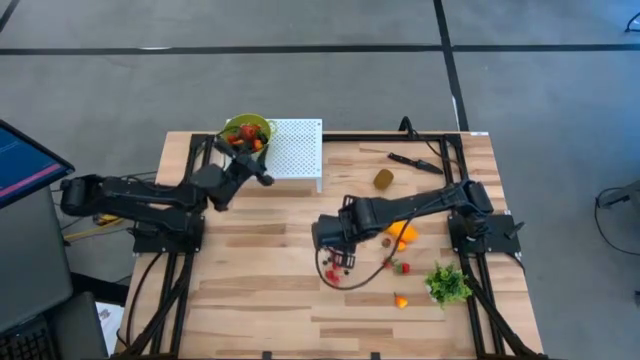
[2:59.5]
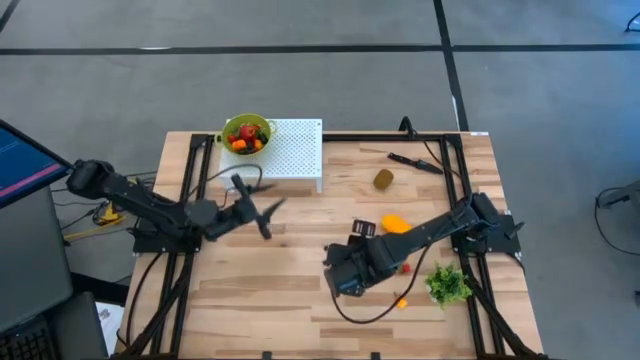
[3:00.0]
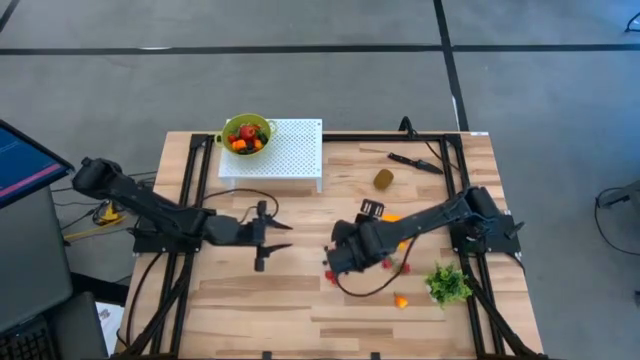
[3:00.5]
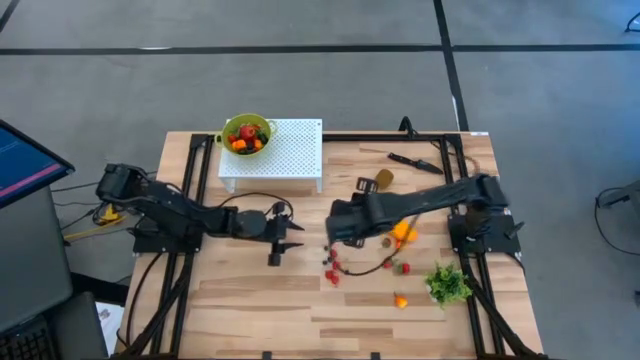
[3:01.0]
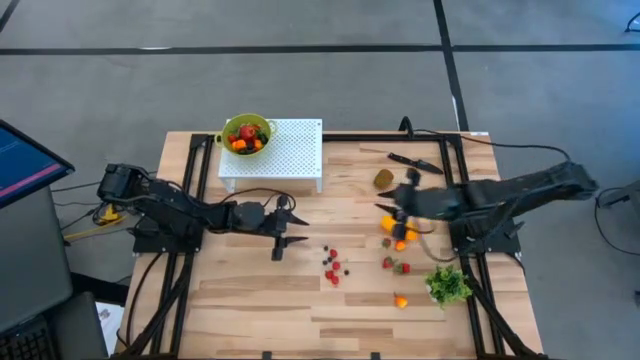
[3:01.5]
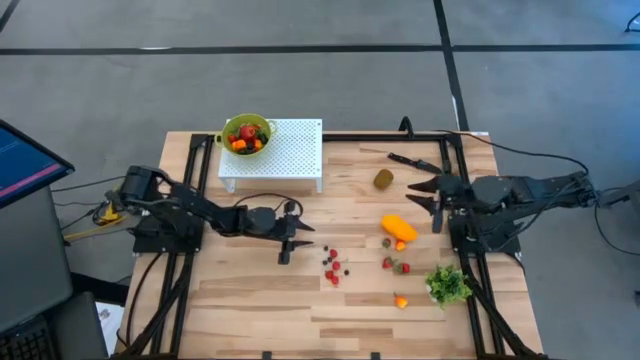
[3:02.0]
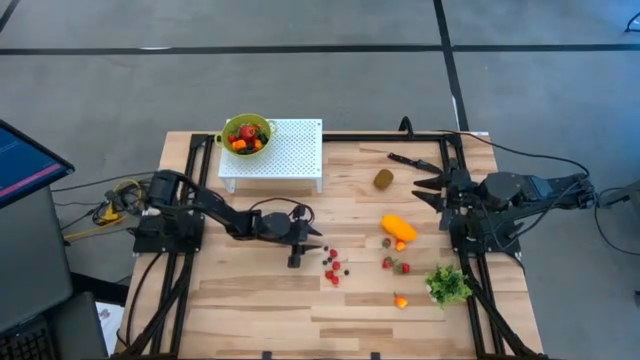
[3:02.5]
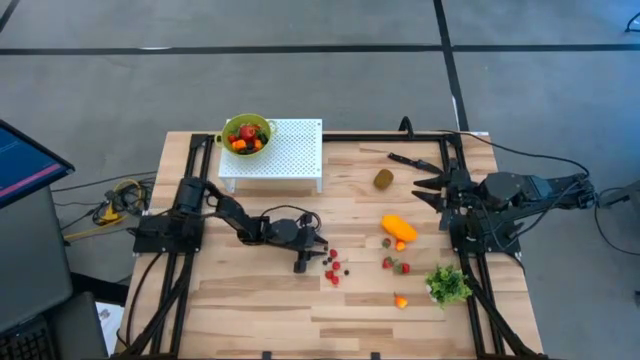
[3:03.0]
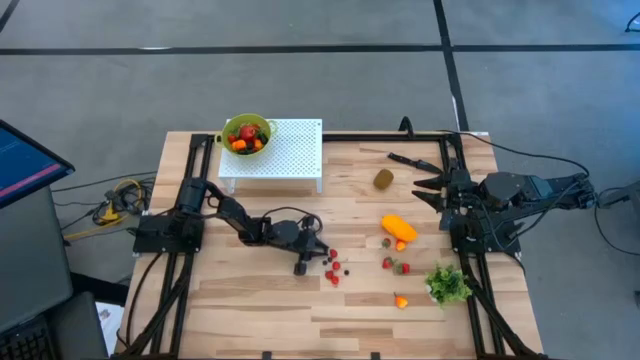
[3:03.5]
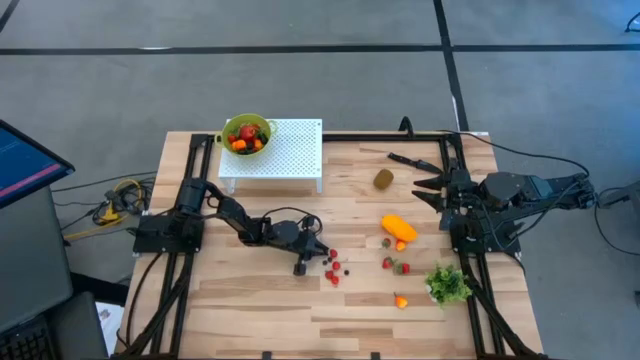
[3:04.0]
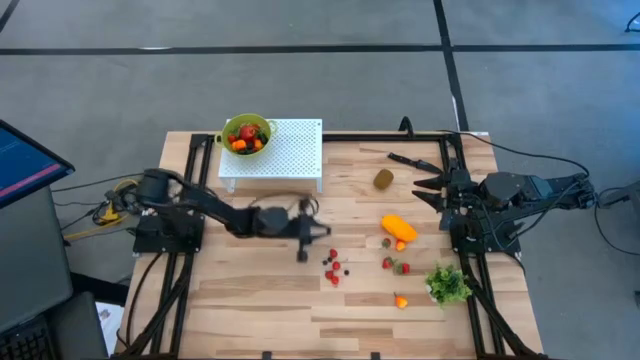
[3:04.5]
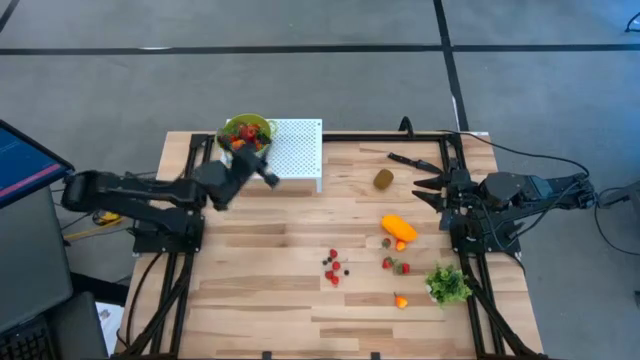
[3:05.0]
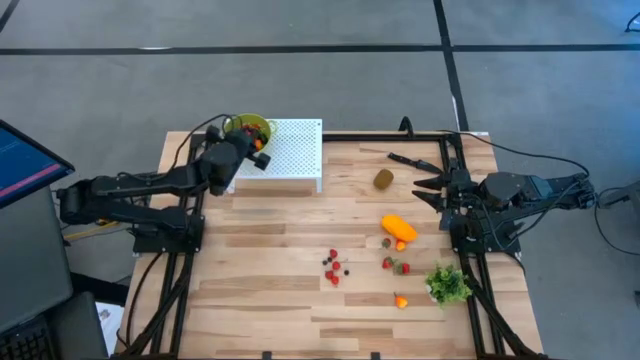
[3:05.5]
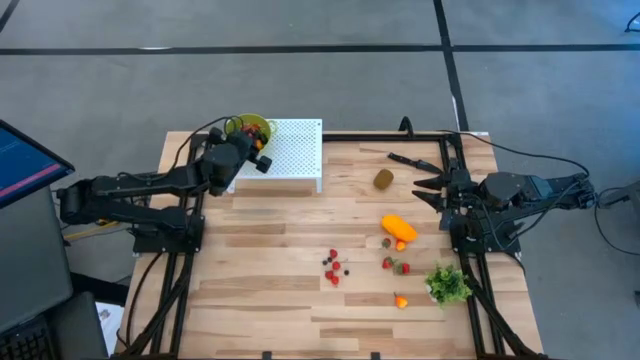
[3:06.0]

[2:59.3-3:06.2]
Task: Pick & Place Fruit
Put the blueberry into the green strainer bowl on the shelf on the shelf

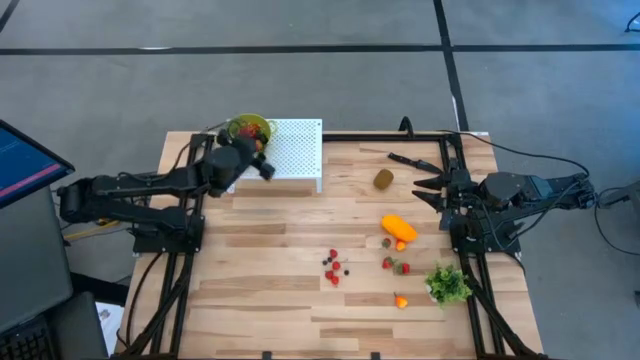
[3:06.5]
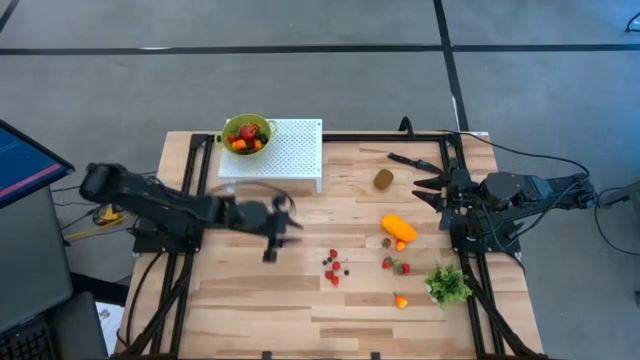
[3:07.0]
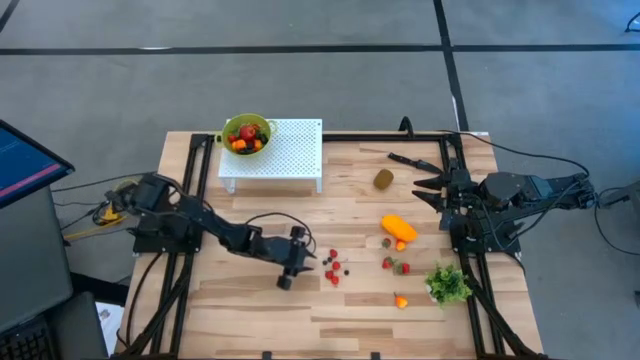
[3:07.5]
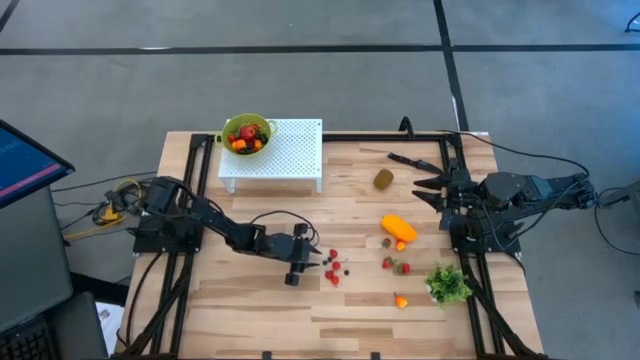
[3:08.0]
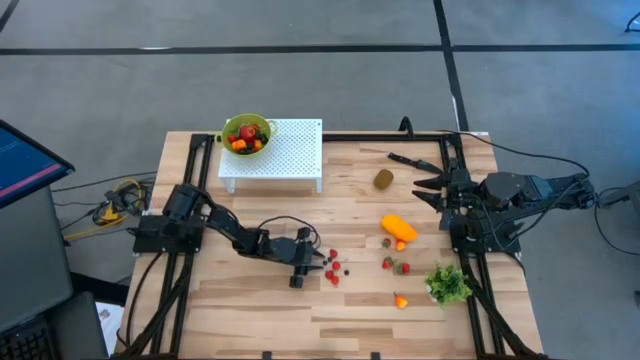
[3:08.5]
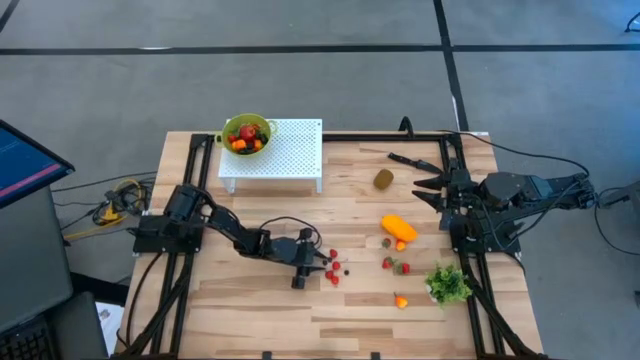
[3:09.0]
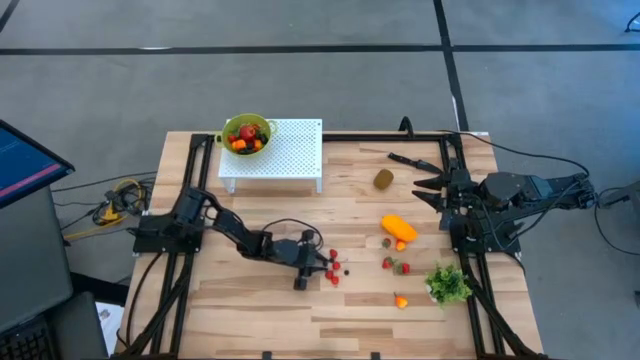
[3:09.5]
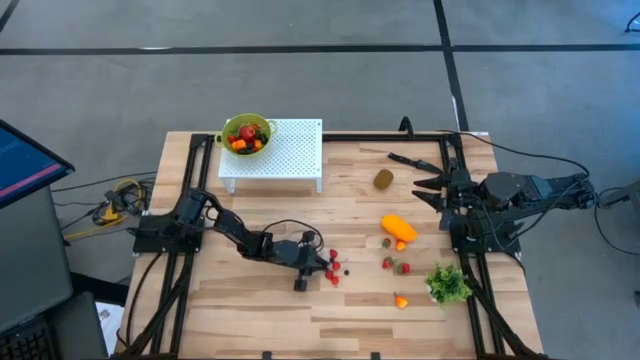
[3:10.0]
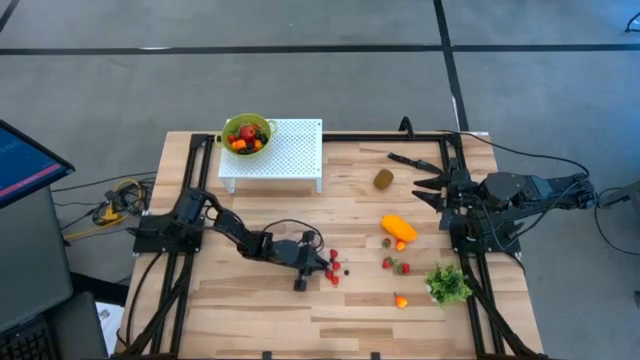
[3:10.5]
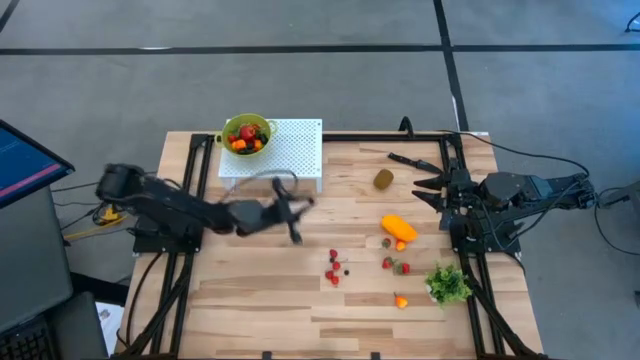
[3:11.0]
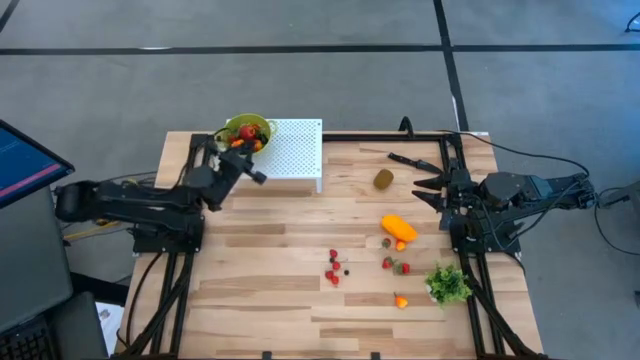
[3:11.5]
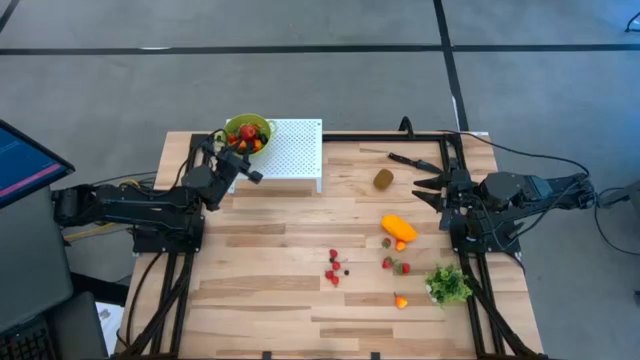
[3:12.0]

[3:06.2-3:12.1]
Put the blueberry into the green strainer bowl on the shelf

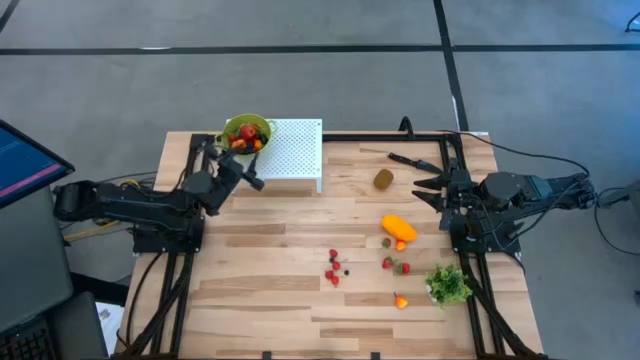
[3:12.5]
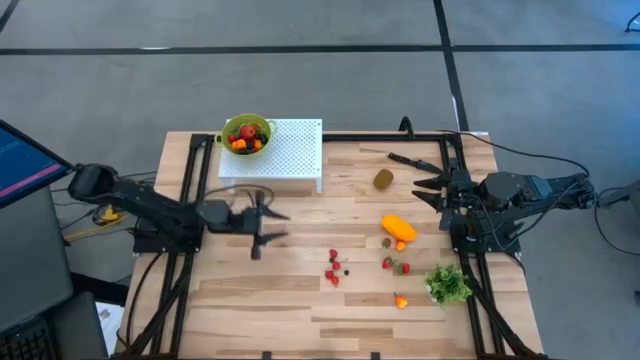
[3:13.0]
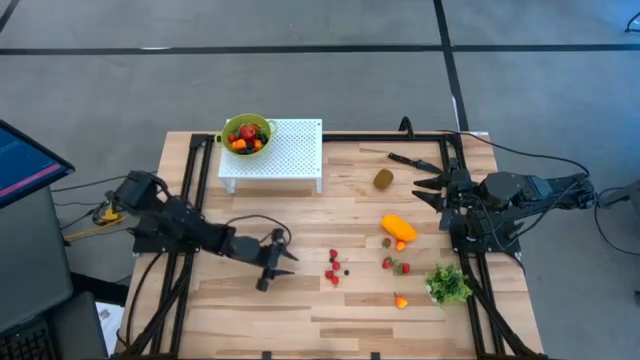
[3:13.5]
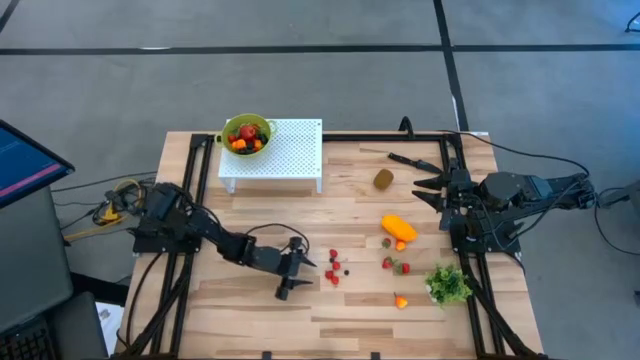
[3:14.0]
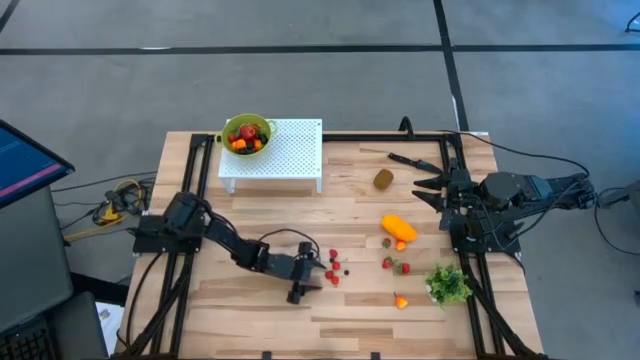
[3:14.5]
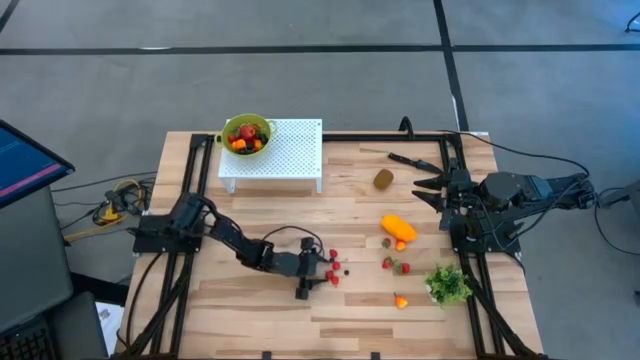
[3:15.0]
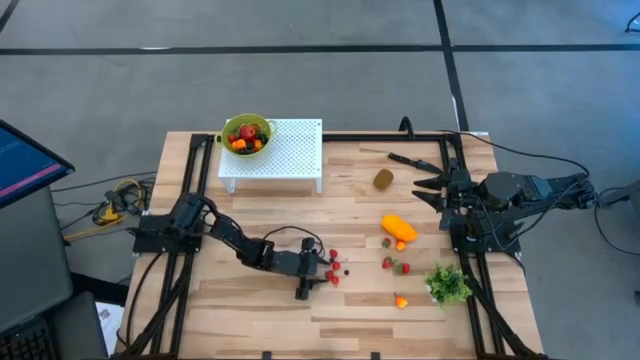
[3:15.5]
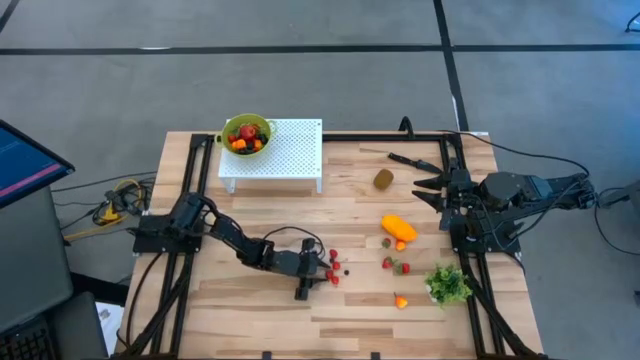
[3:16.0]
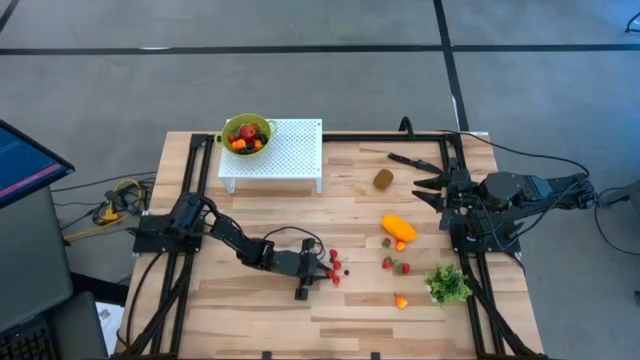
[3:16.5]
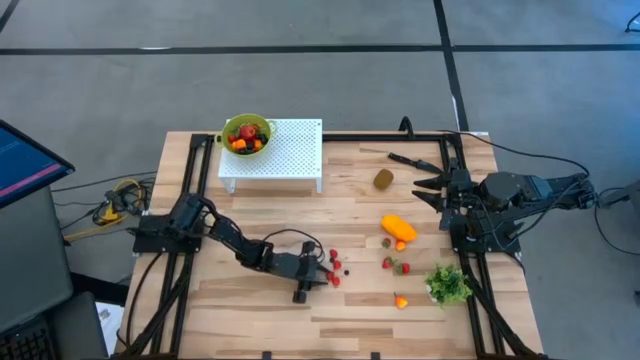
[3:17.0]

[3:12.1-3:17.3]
Put the raspberry into the green strainer bowl on the shelf

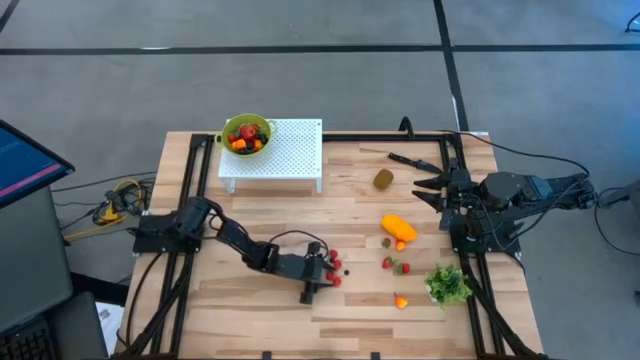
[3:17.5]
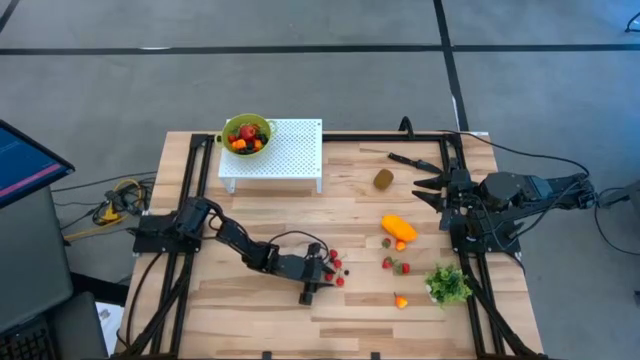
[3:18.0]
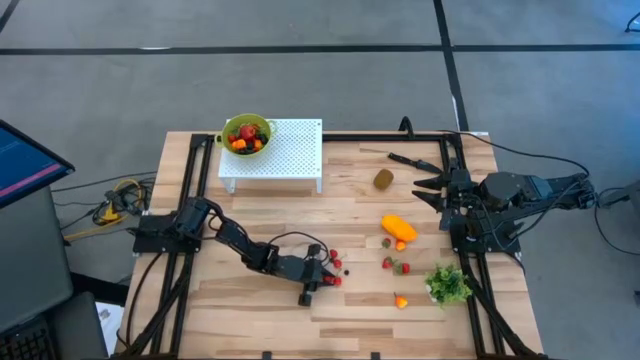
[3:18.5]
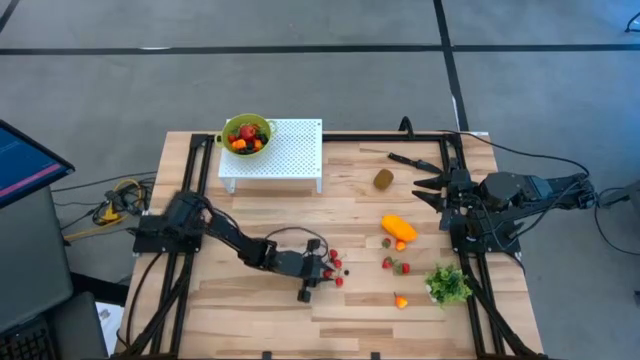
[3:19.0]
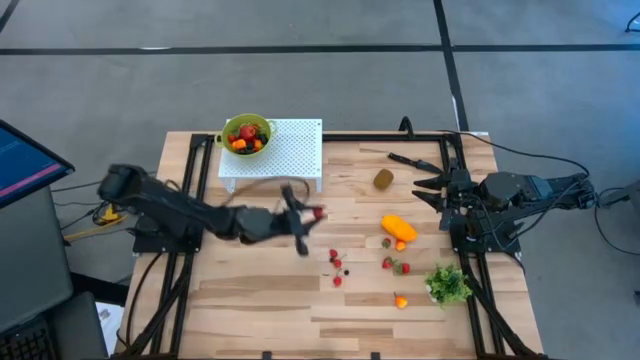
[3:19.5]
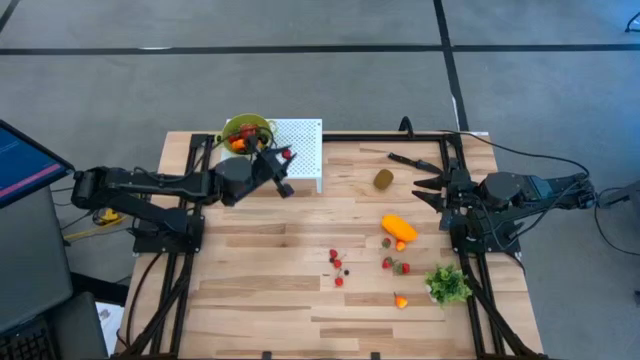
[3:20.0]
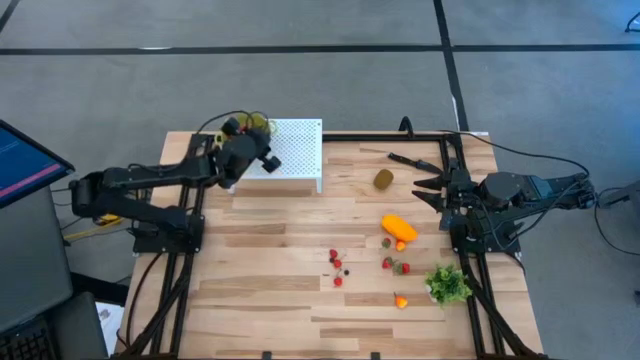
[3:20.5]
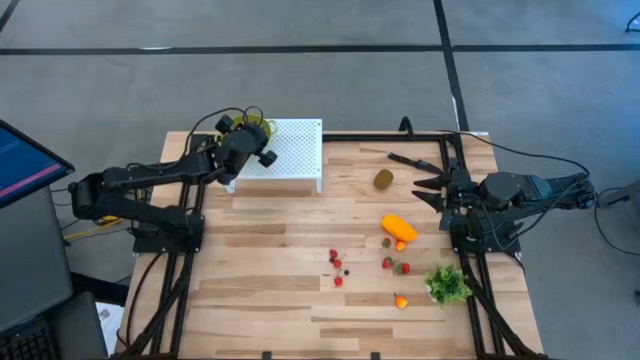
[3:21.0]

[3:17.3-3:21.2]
Put the raspberry into the green strainer bowl on the shelf
